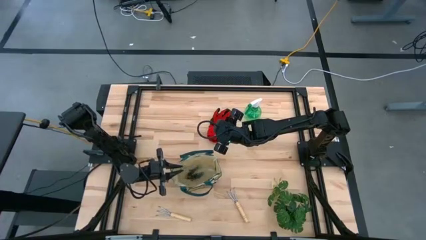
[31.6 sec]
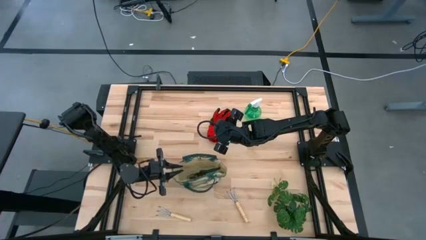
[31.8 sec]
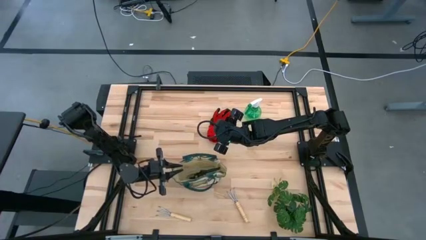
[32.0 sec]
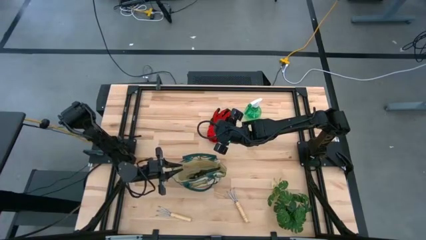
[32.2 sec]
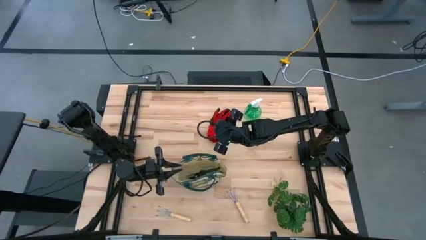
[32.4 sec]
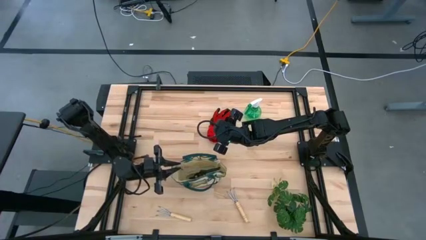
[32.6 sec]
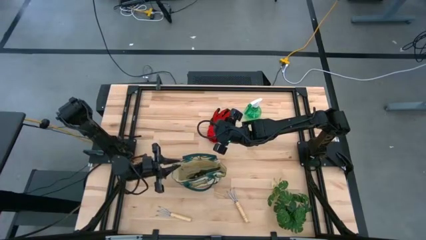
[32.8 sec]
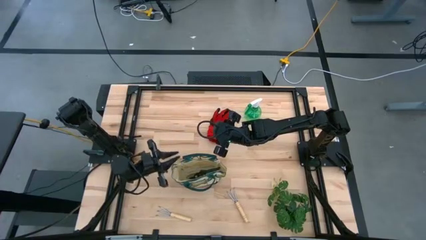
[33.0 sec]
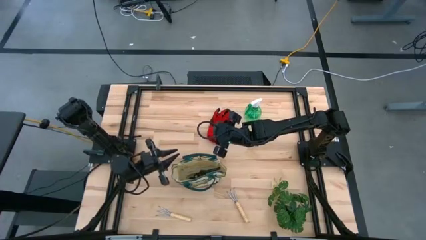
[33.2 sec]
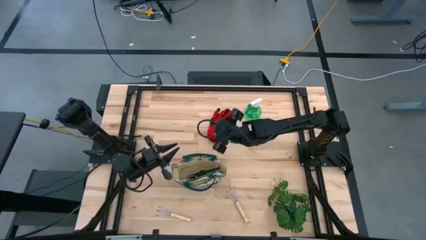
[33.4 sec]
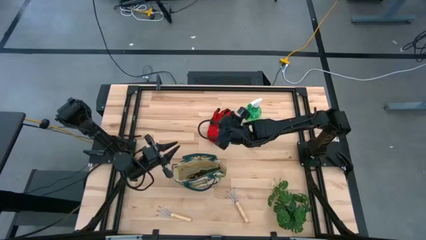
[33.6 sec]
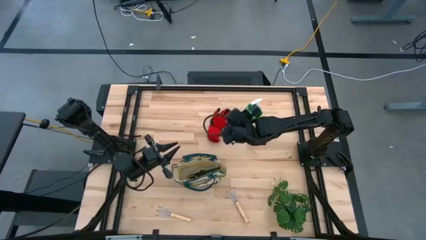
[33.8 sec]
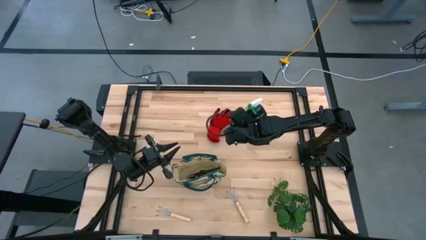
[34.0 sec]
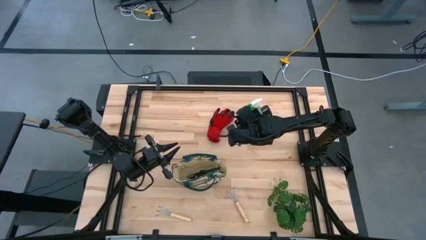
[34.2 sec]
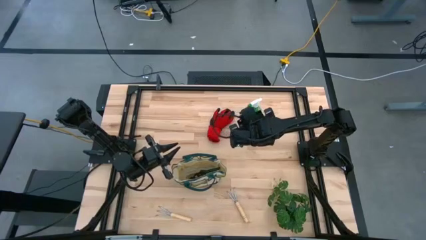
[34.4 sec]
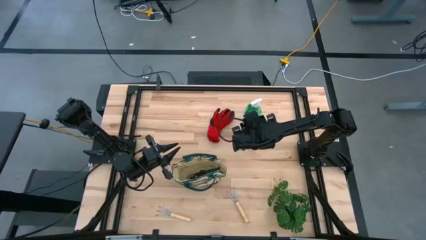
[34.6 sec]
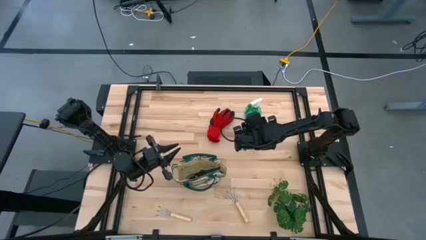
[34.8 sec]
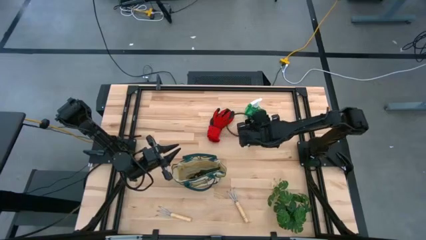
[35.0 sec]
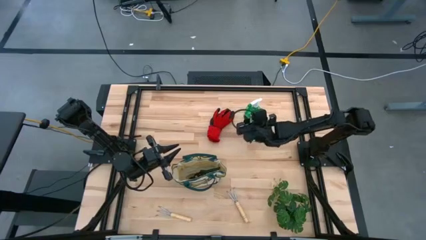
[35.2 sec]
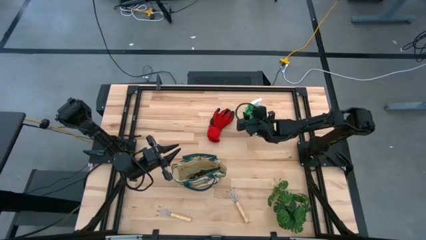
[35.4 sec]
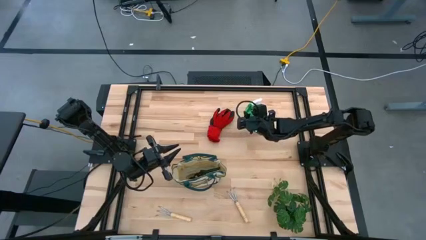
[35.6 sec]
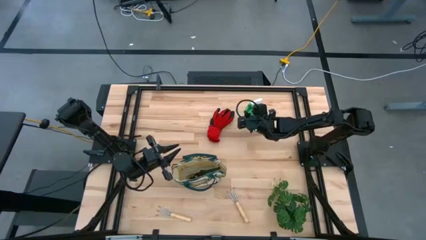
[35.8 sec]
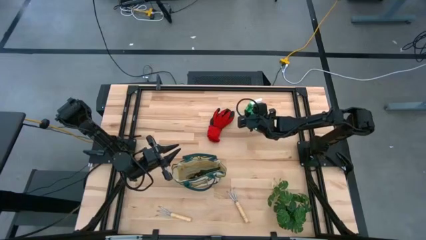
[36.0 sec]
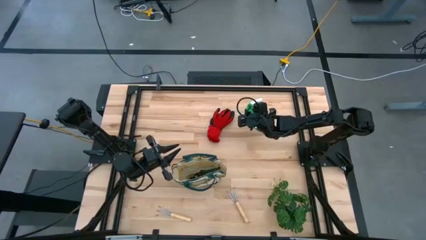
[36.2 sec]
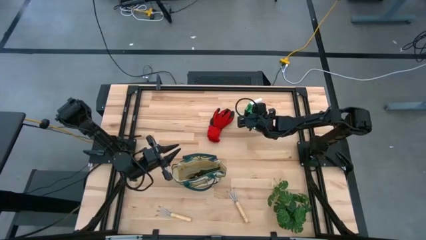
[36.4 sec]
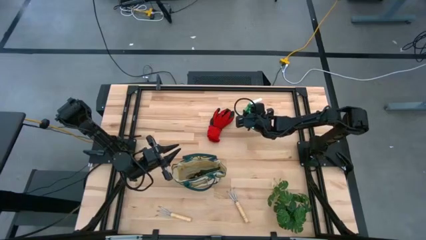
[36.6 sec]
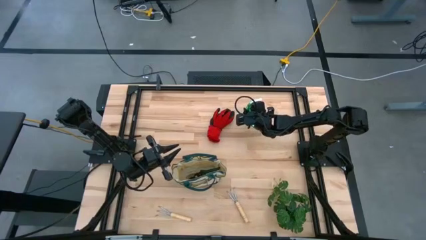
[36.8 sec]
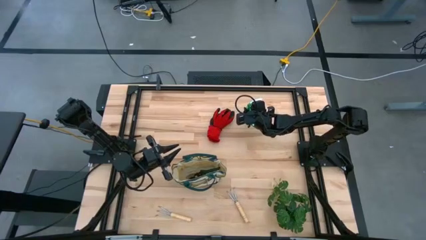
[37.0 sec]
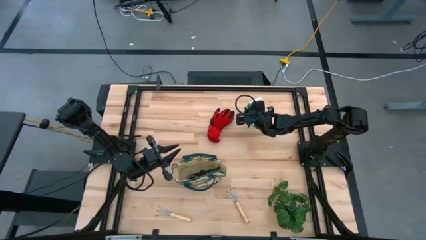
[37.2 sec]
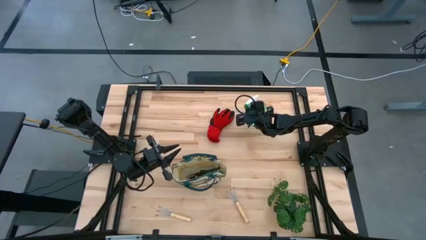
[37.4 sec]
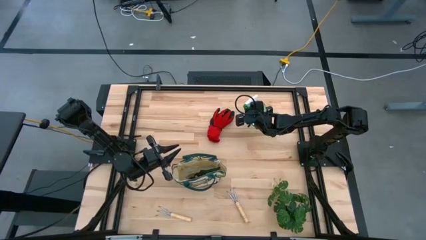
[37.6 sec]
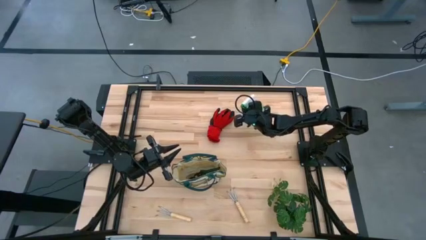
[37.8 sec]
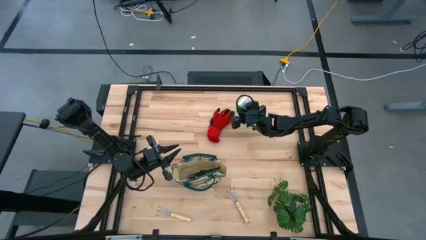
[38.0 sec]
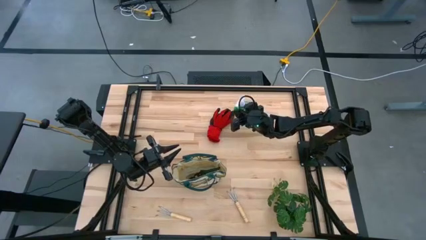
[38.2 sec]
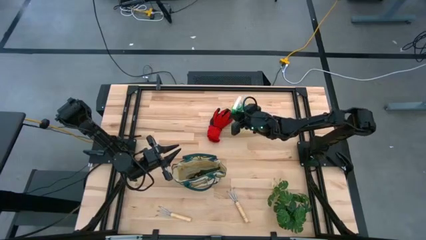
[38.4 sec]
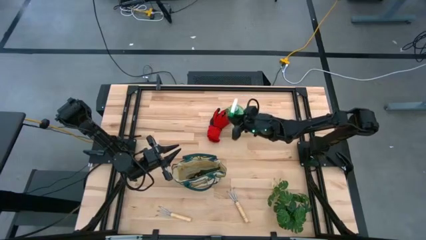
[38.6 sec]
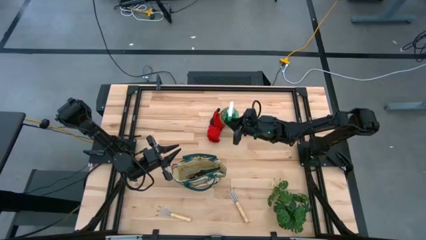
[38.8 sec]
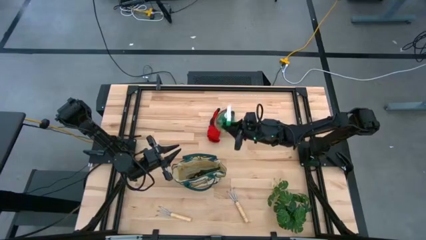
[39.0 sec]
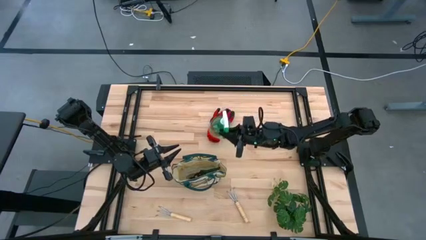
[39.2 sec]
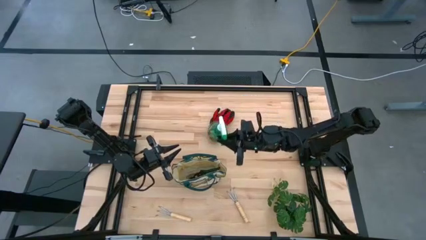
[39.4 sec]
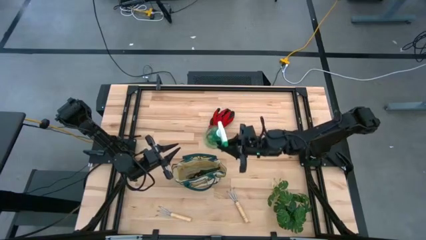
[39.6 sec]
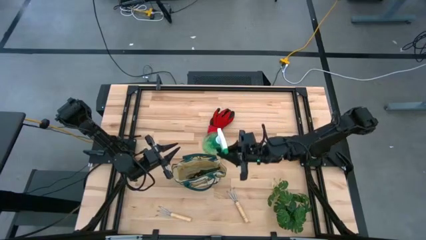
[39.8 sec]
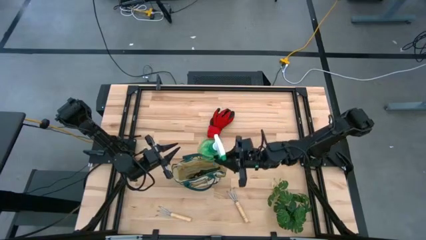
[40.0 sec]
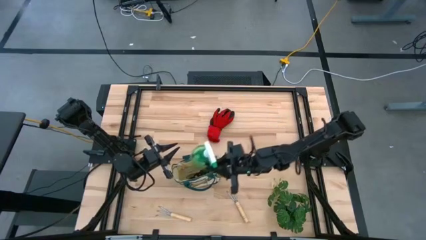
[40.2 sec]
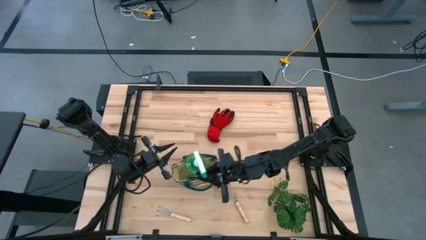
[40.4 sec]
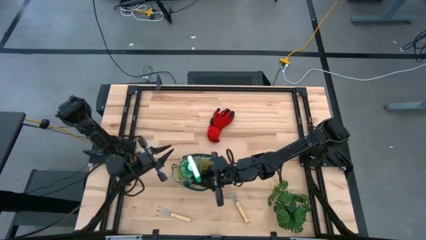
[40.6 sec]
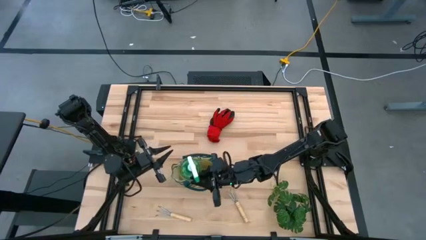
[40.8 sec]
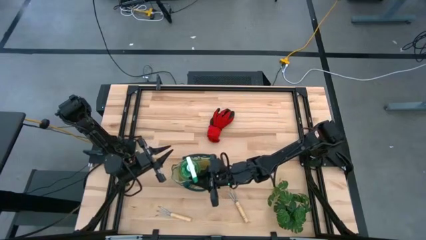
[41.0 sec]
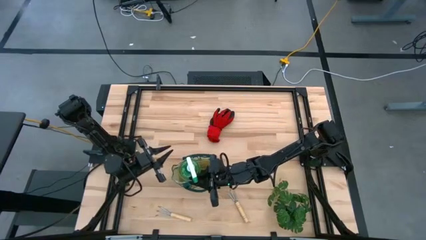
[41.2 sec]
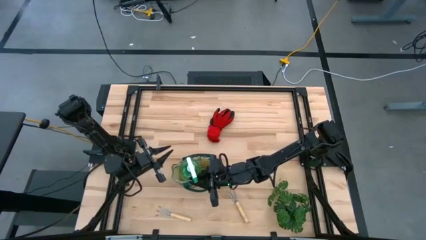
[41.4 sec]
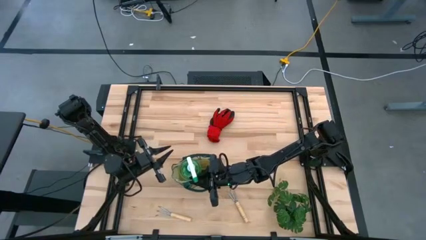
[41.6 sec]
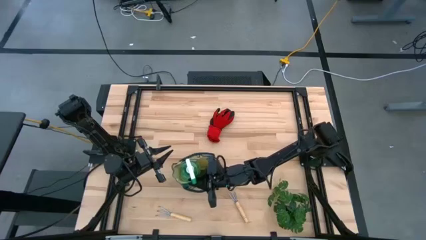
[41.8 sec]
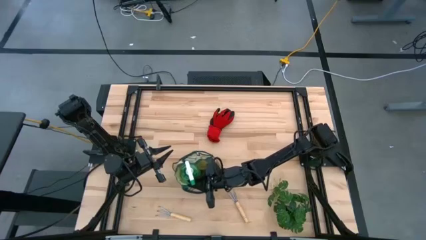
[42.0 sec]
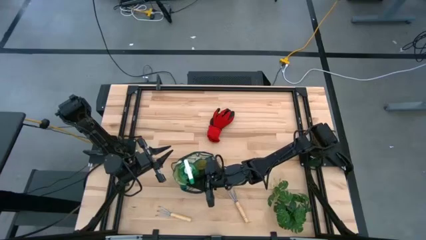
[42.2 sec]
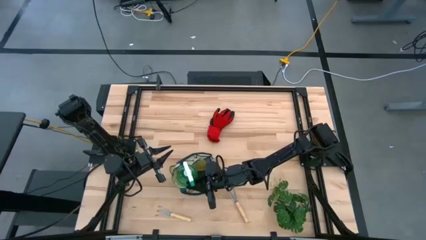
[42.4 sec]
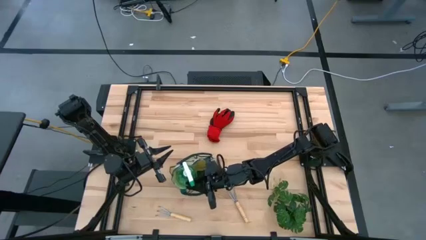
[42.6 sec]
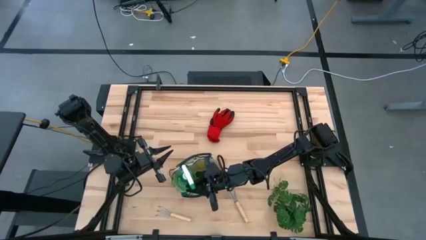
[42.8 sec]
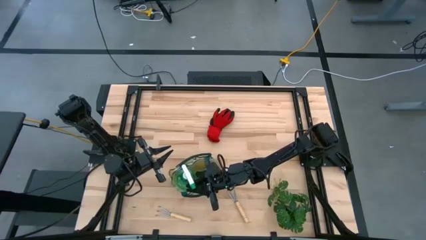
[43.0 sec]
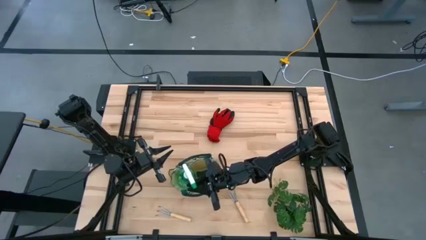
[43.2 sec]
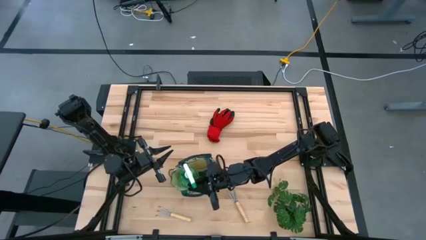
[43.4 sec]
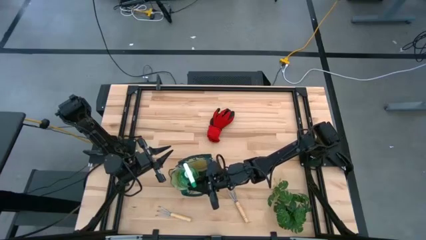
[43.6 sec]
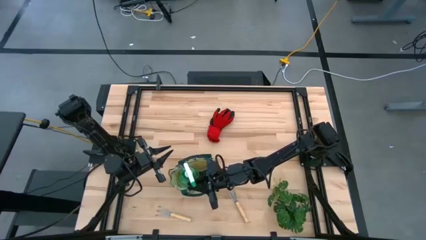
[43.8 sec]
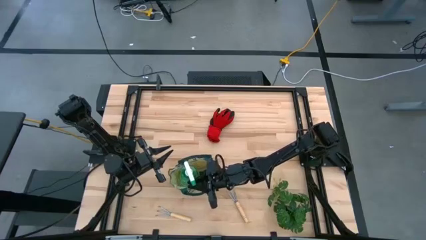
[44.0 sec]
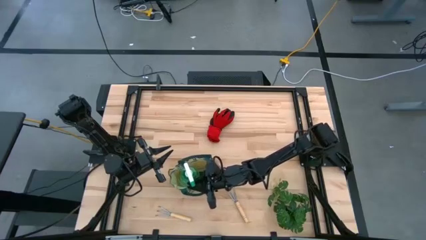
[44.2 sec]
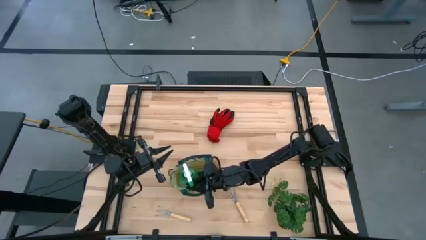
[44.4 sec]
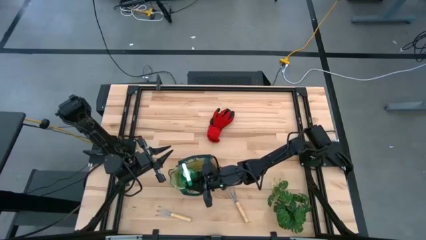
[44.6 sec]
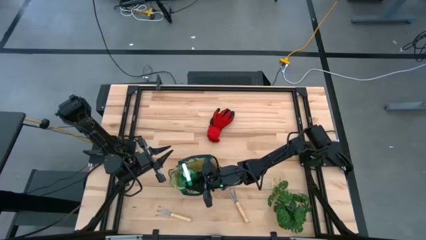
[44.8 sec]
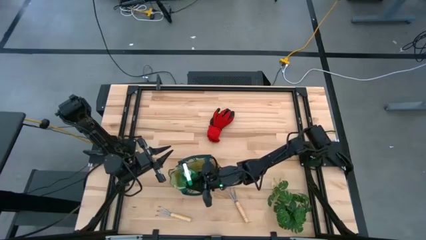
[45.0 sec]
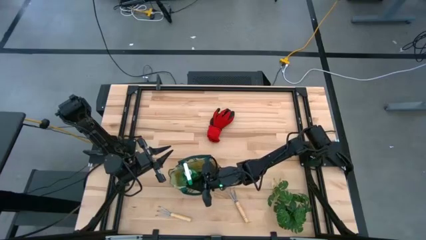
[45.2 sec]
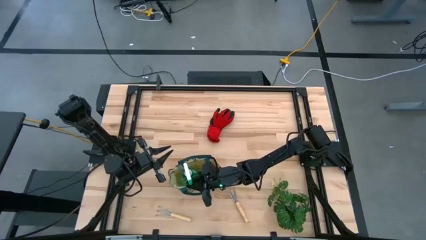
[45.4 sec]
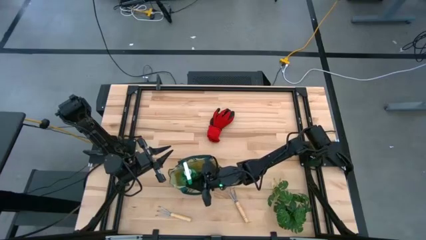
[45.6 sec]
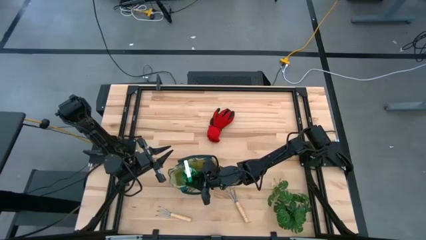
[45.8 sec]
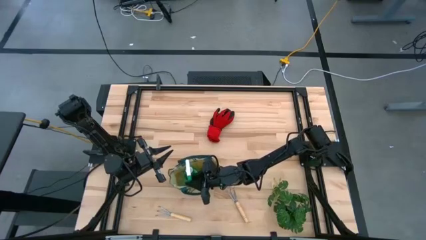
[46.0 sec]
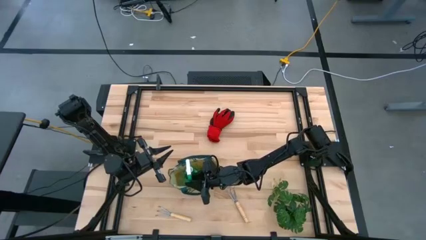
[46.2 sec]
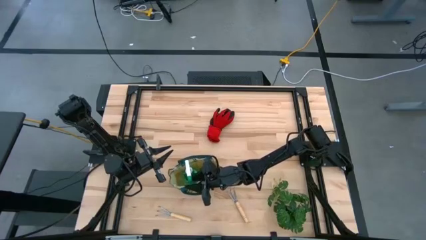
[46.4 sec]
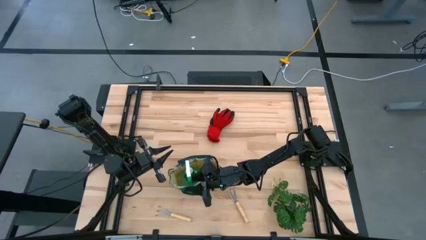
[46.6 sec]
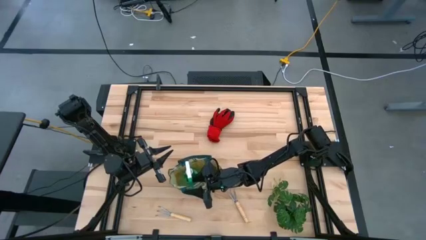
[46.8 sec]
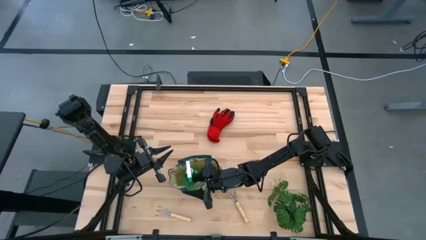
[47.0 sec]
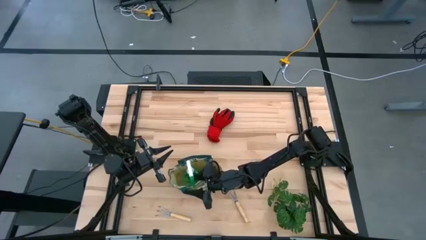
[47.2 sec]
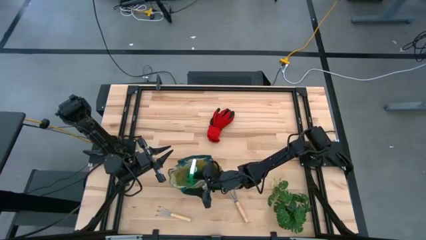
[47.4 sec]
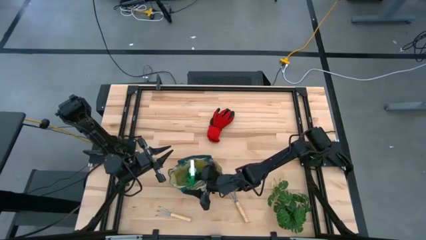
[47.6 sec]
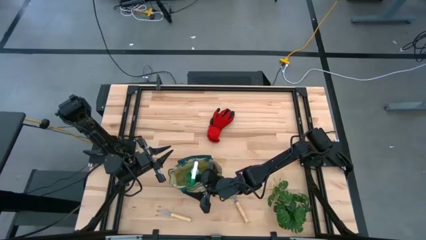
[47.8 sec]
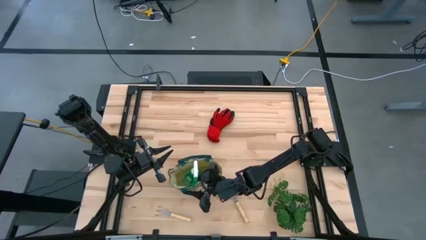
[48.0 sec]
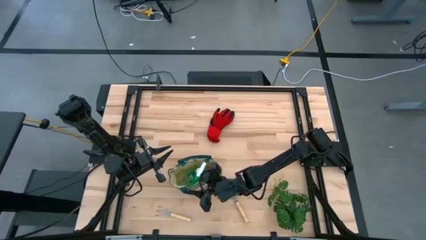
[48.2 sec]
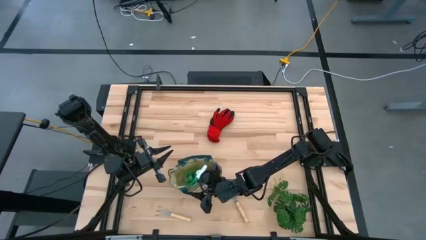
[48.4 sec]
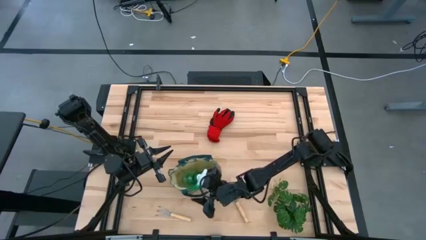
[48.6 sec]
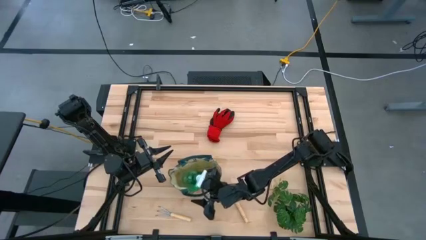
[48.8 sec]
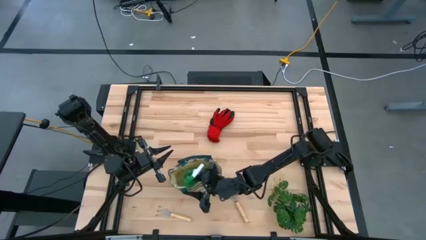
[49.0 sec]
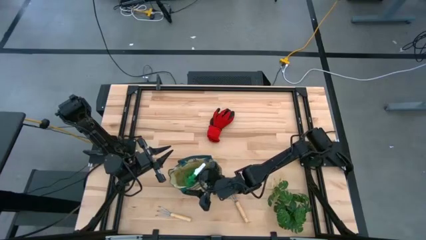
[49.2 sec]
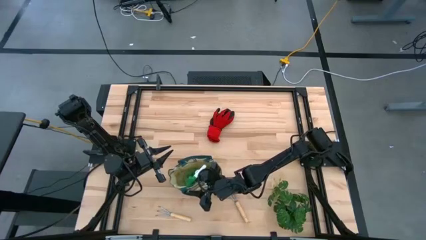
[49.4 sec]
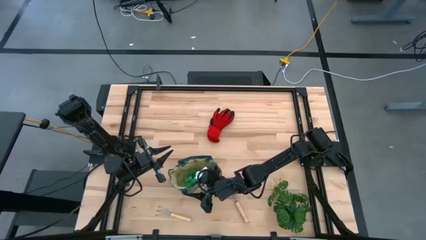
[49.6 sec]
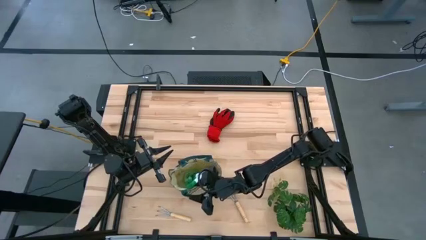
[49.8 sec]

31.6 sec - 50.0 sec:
Task: Pick & Place Garden tools in Gardening bag
Put the spray bottle into the gardening bag
